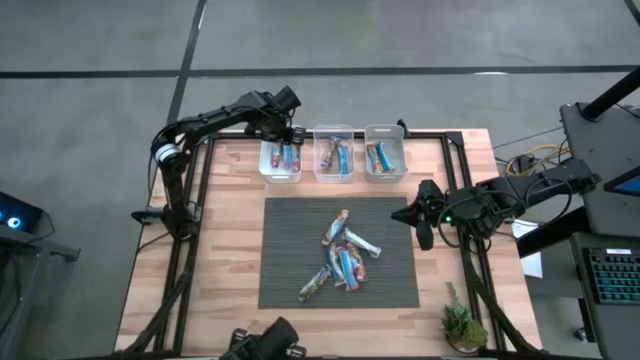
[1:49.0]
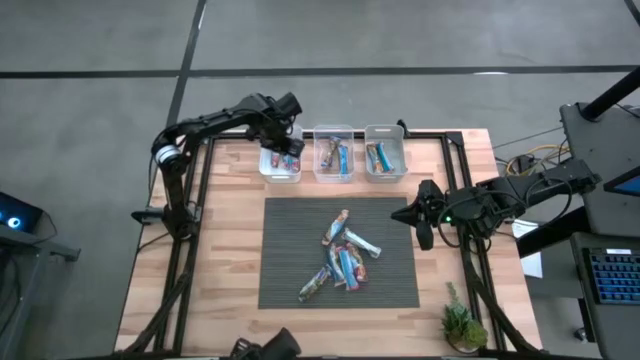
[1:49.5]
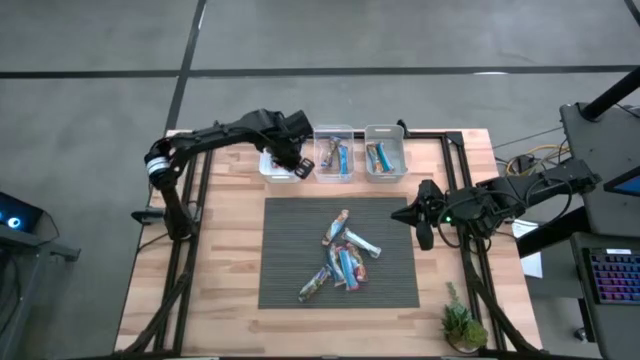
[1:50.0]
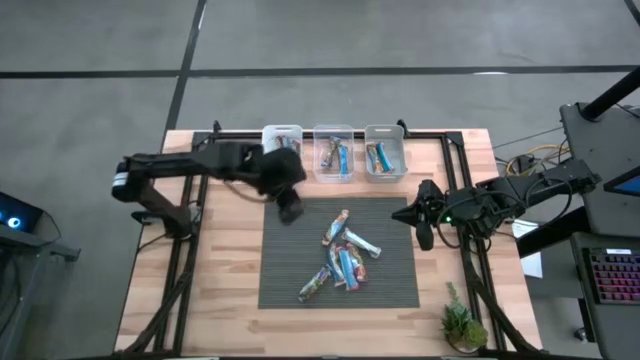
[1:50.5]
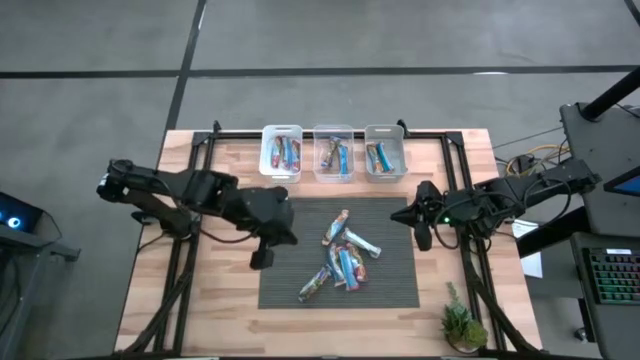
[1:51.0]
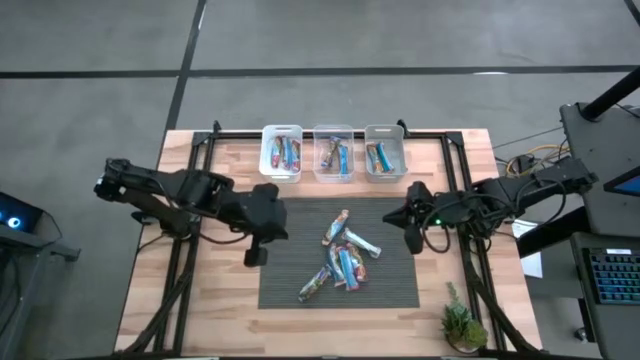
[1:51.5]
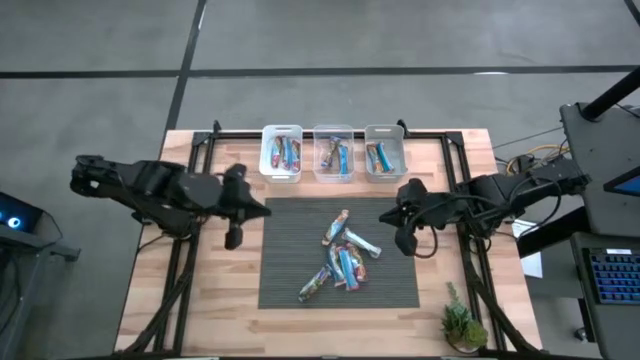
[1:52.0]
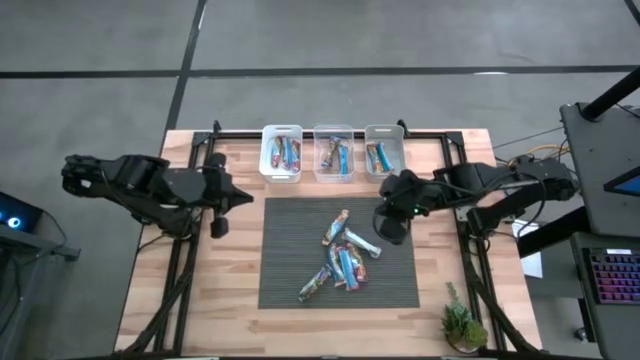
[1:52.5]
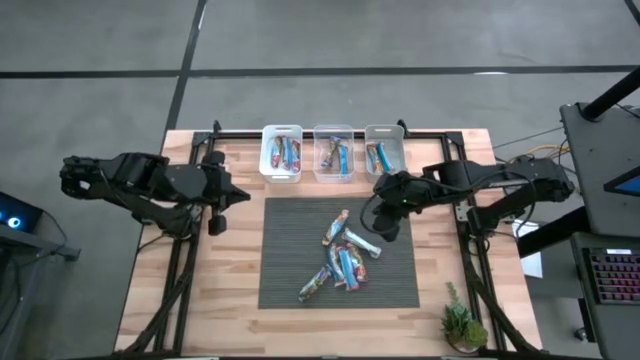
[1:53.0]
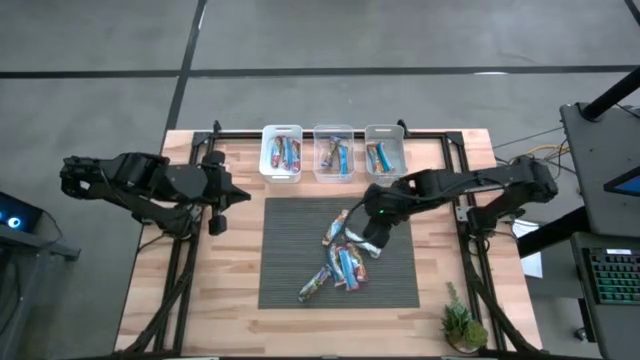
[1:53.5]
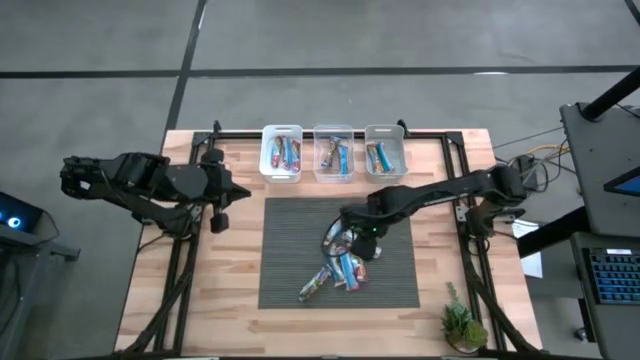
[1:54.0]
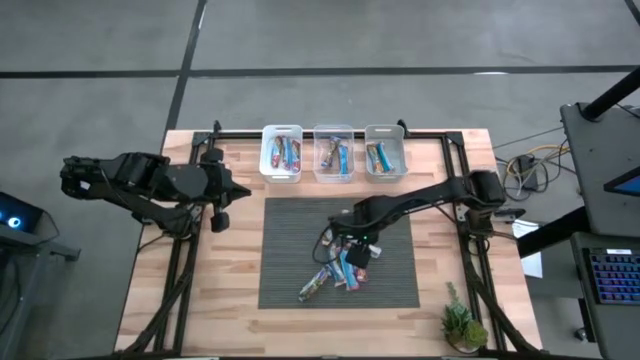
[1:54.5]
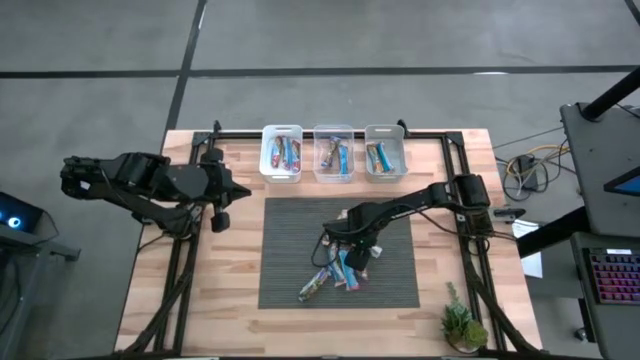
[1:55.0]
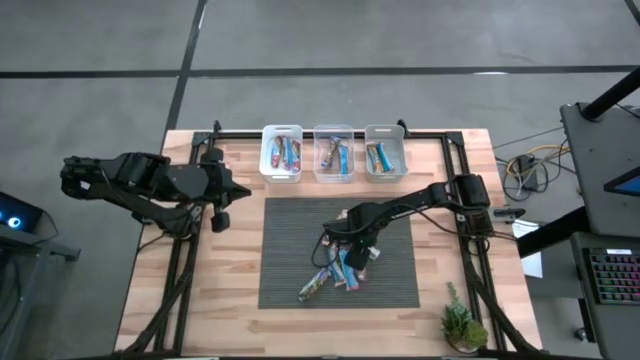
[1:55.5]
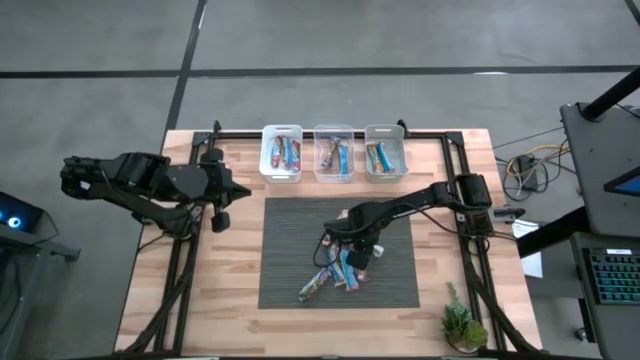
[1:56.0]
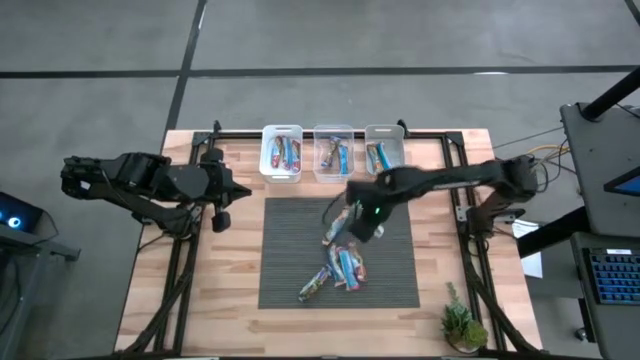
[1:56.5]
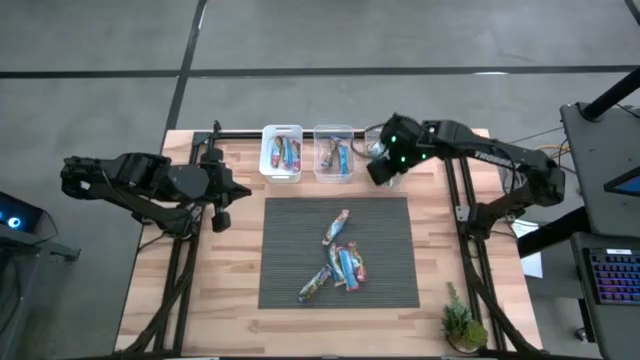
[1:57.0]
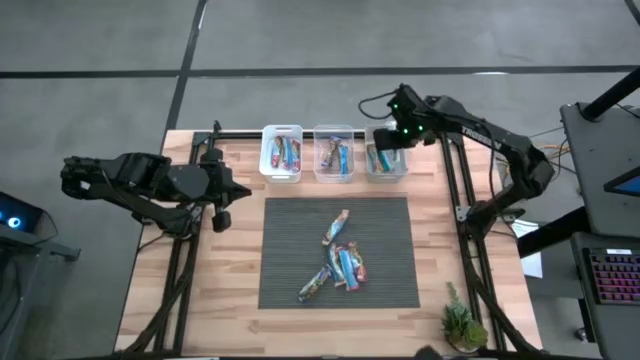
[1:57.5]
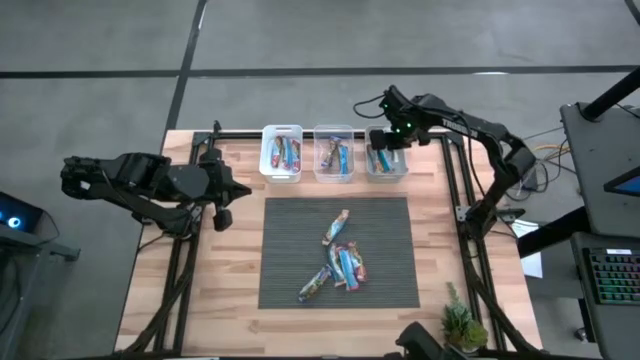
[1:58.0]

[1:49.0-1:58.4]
Task: Pick and place Granola Bars by type
Put the yellow granola bar into the gray bin

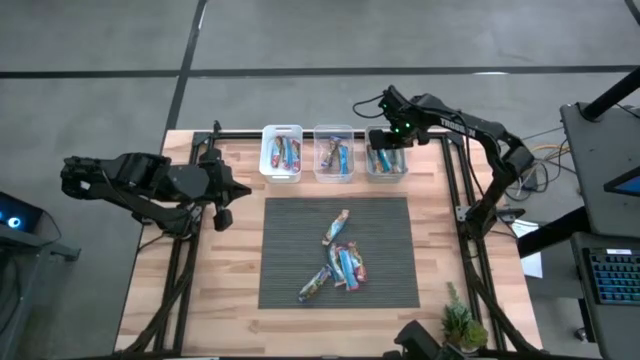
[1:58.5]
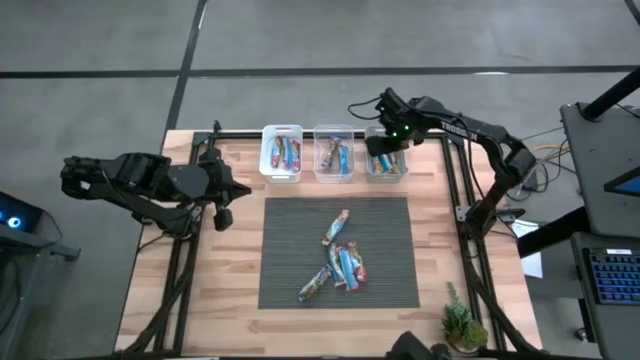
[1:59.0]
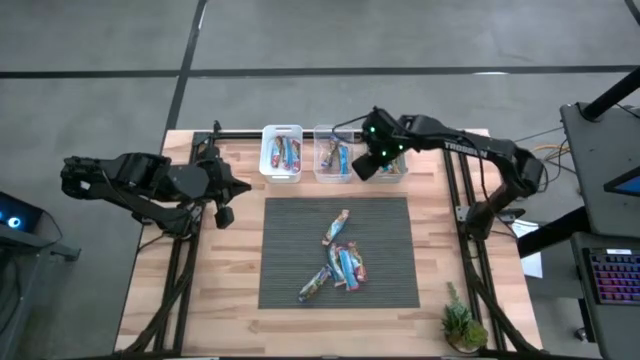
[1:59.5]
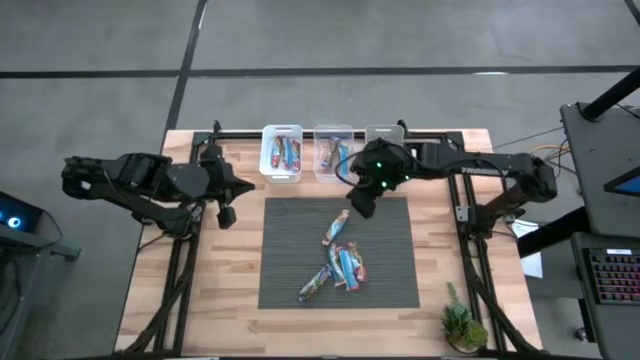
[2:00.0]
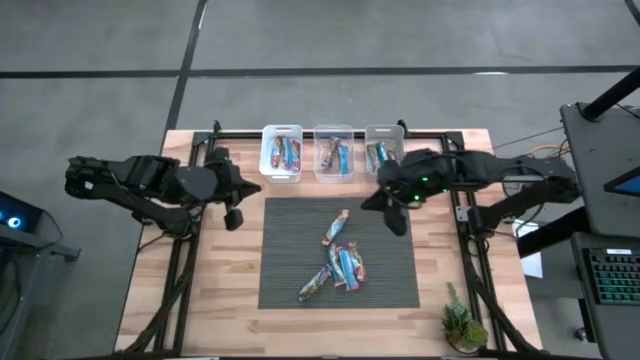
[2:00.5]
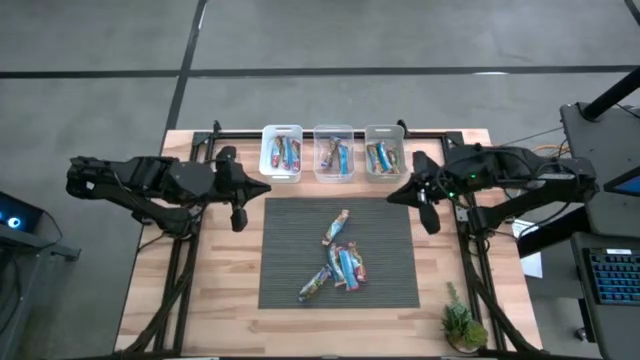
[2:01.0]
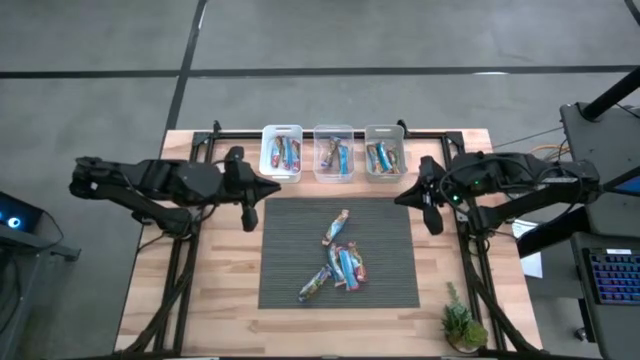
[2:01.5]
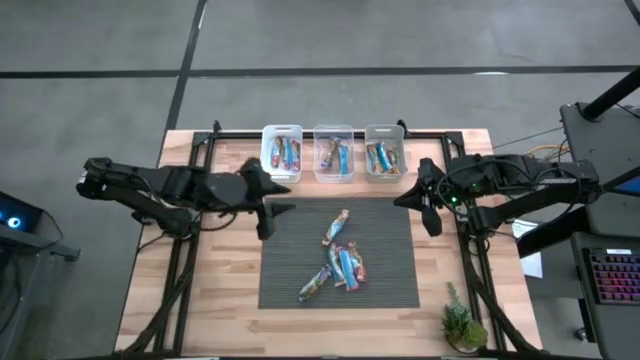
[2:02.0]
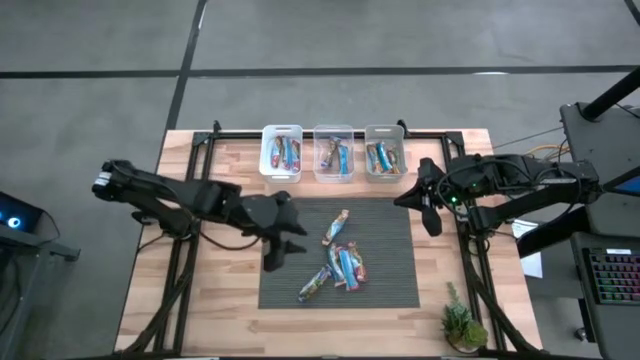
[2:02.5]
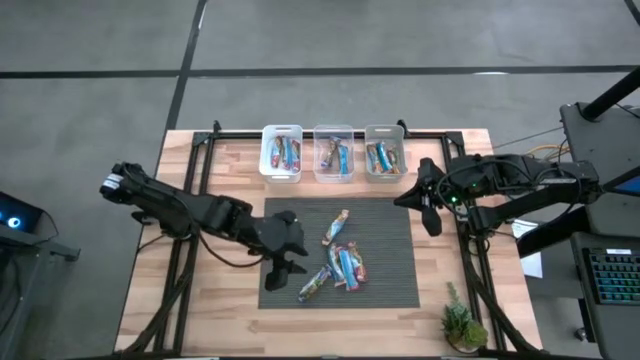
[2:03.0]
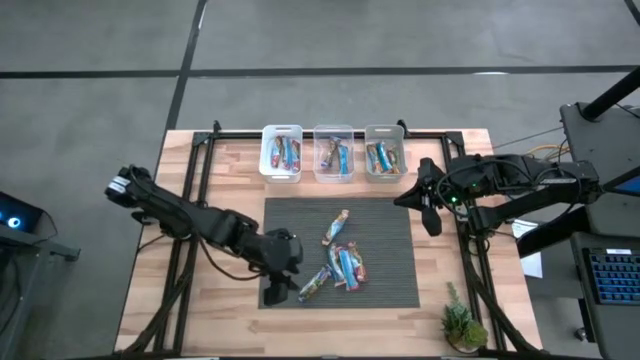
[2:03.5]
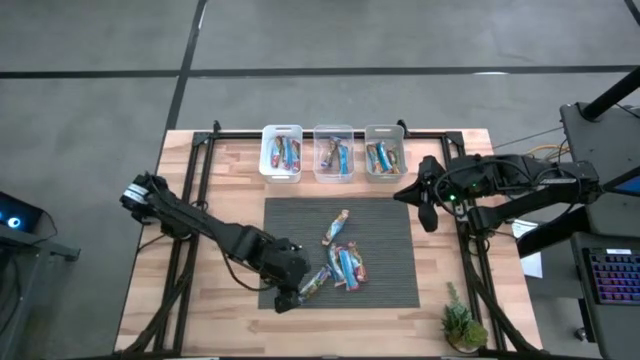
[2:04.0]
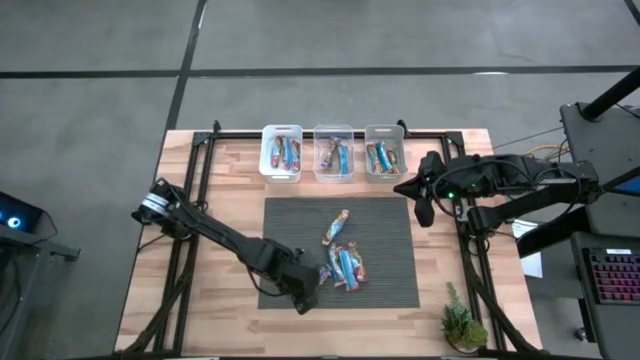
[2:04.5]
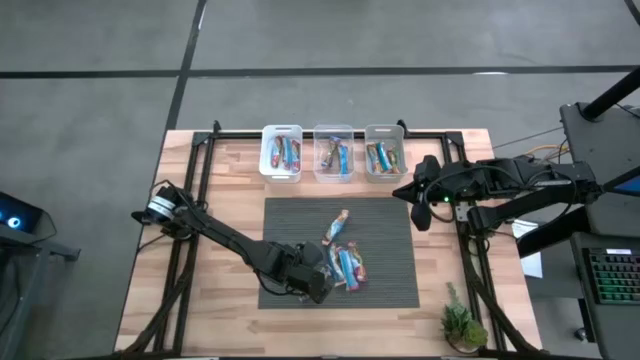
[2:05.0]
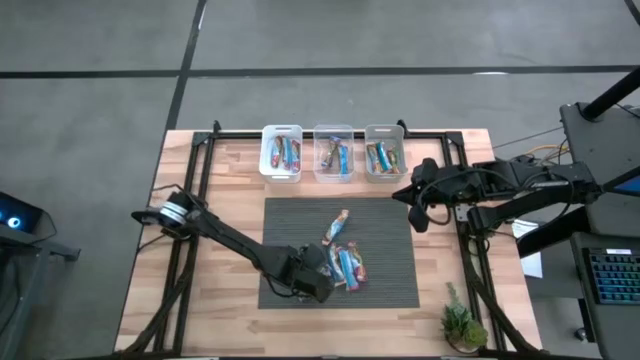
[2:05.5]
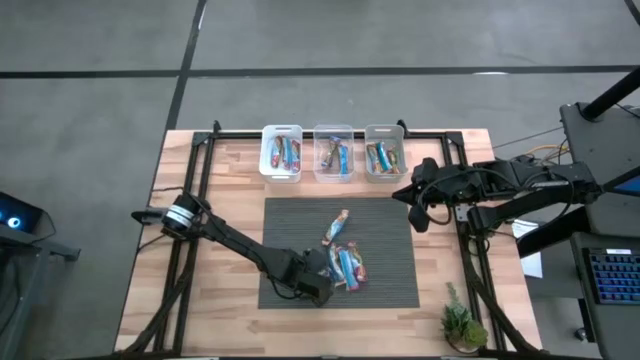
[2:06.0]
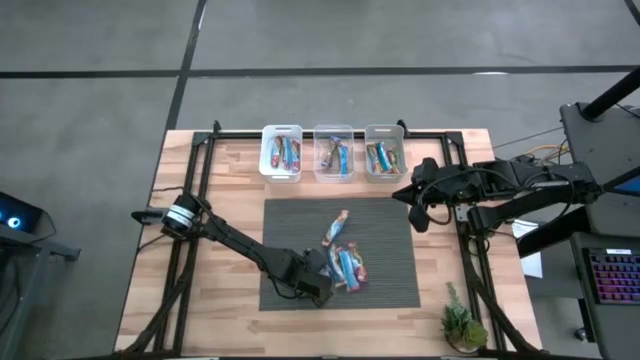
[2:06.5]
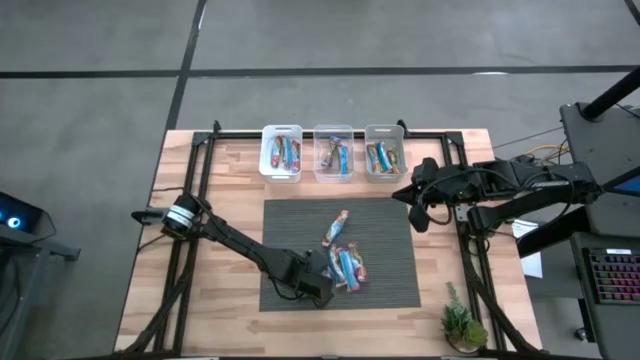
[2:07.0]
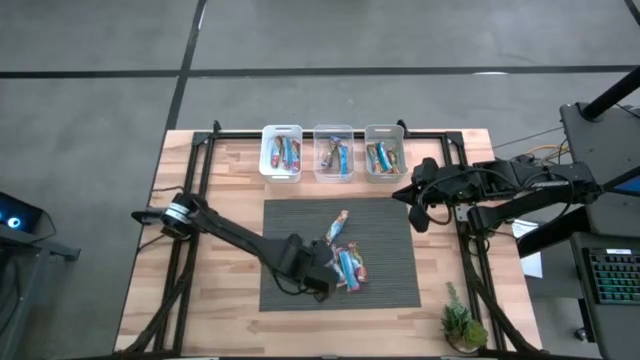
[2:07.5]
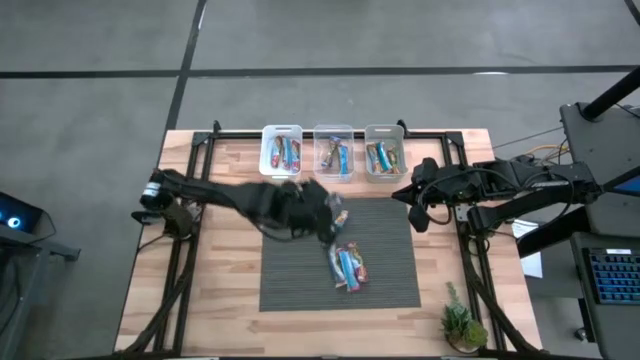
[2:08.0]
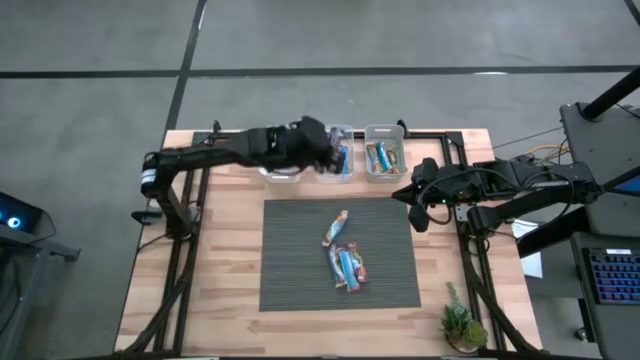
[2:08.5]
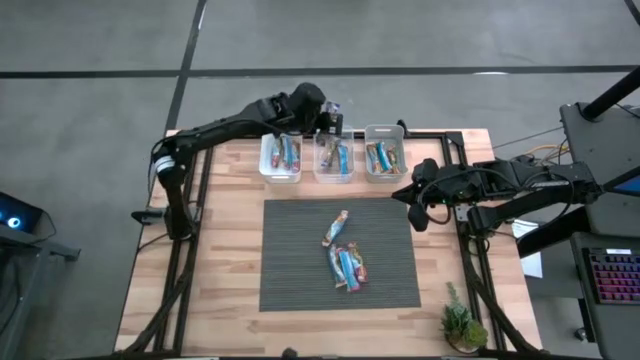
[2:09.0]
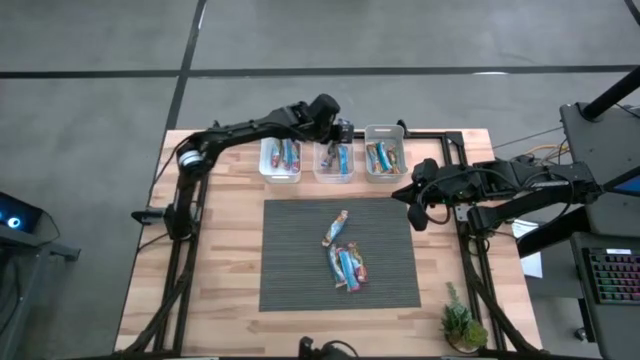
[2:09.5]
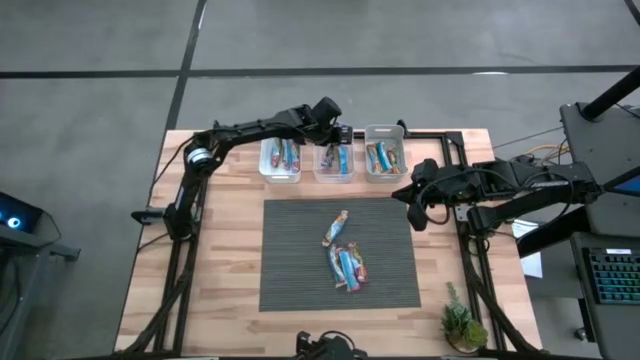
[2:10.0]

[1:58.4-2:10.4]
Put the blue granola bar into the transparent bin

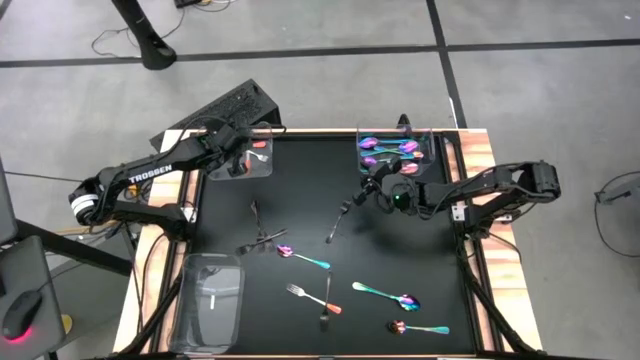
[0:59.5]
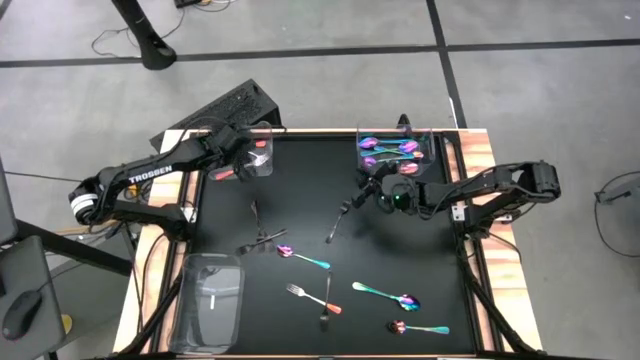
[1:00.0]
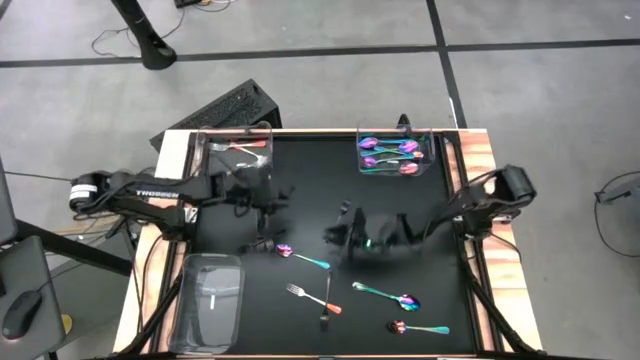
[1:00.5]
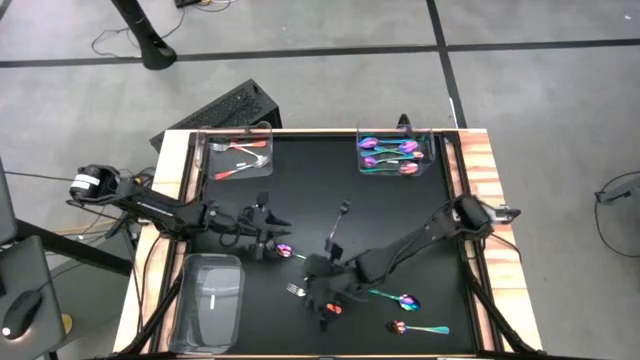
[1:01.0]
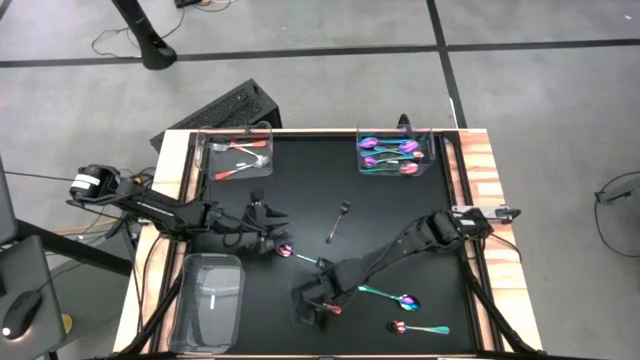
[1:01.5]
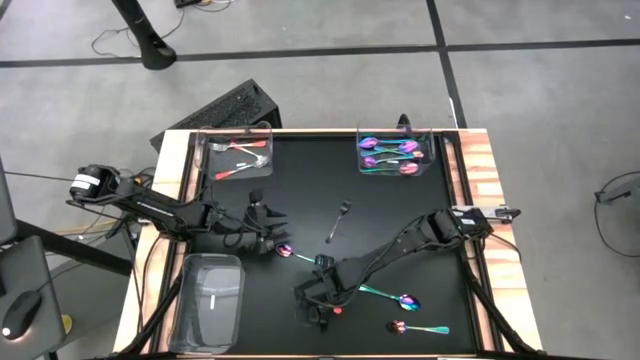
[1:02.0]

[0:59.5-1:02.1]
Task: Sort silverware by color (type)
Put the orange fork into top left transparent bin
